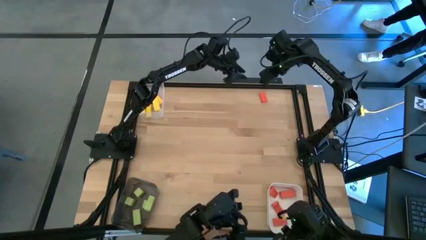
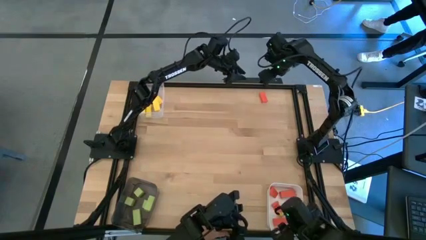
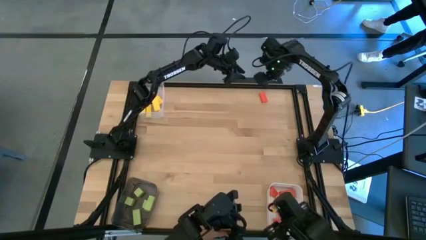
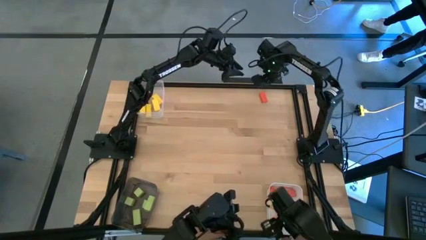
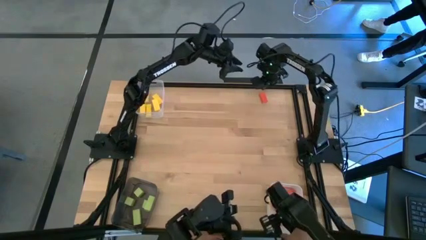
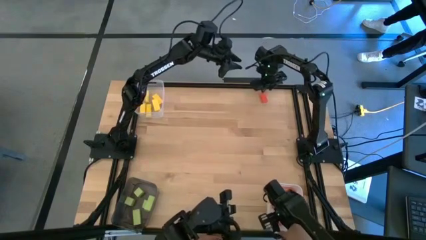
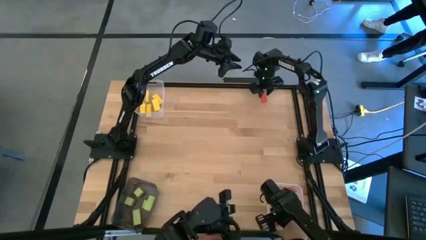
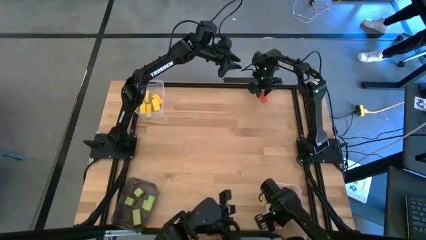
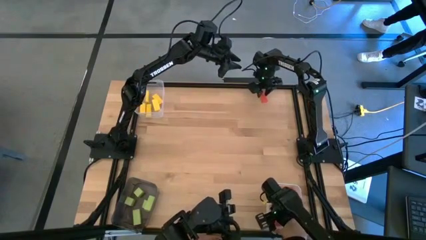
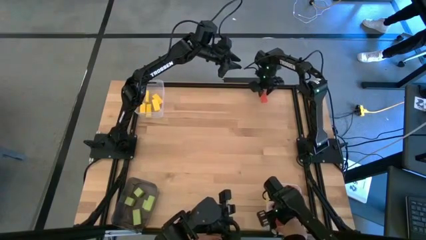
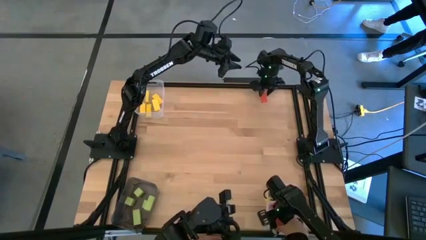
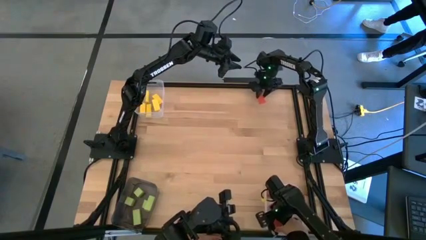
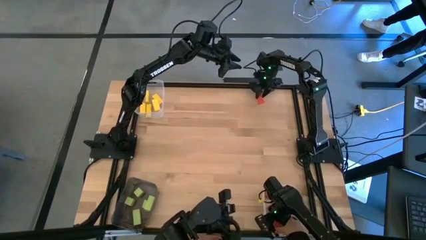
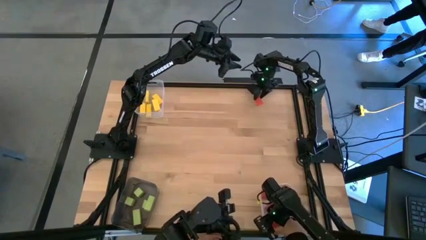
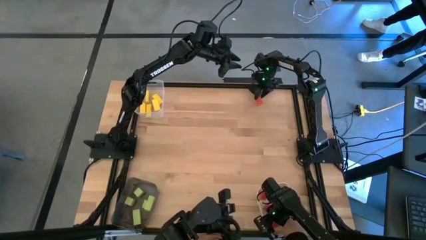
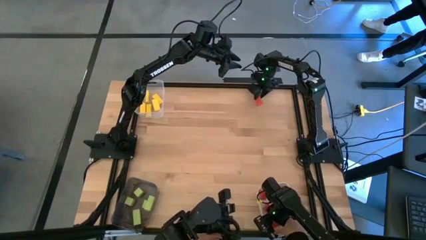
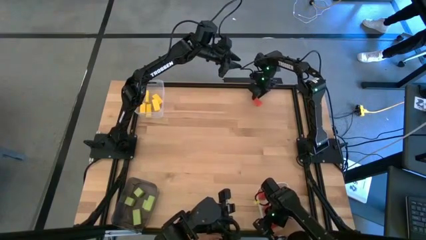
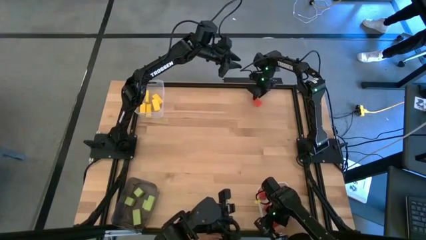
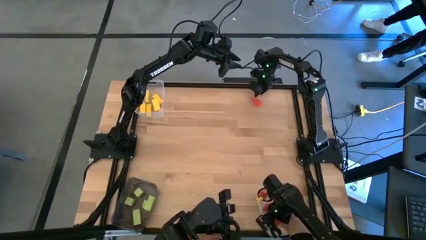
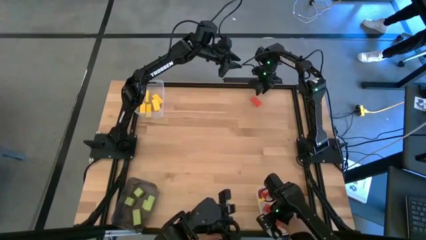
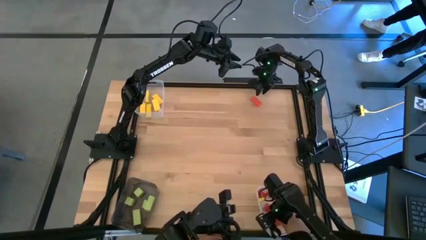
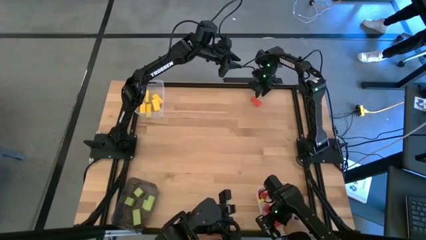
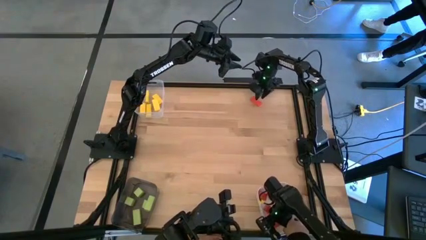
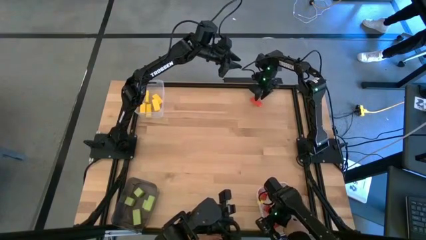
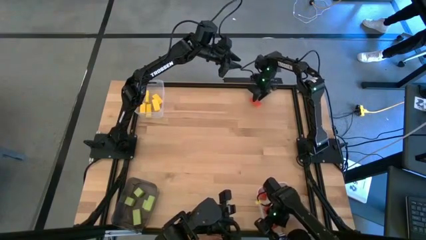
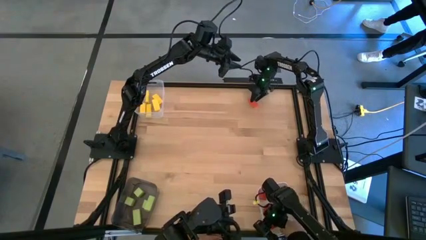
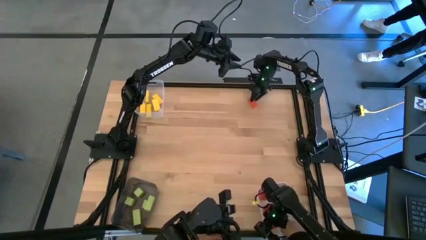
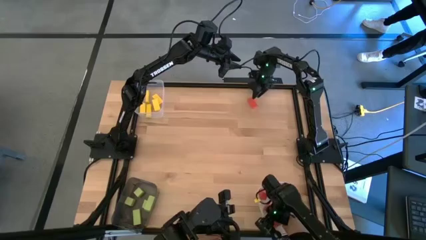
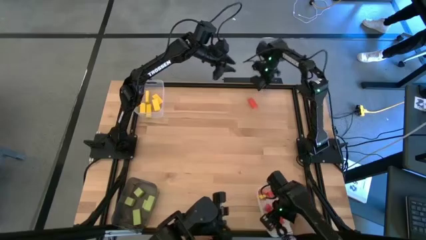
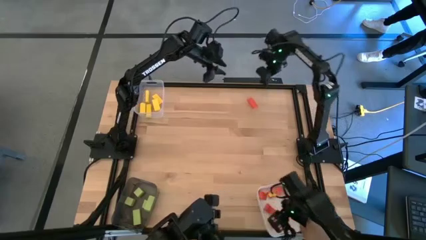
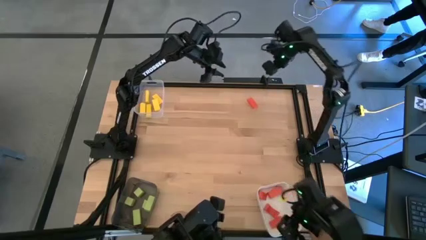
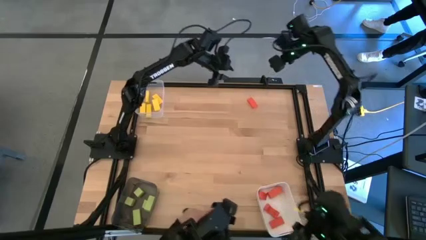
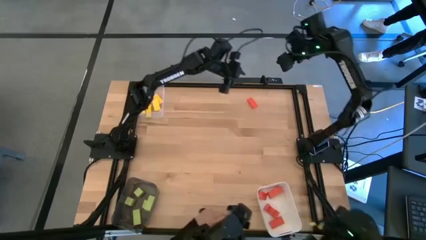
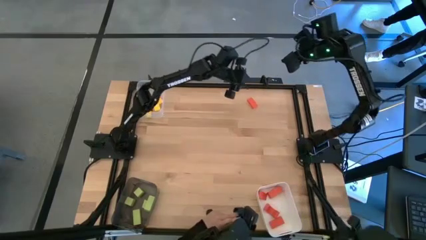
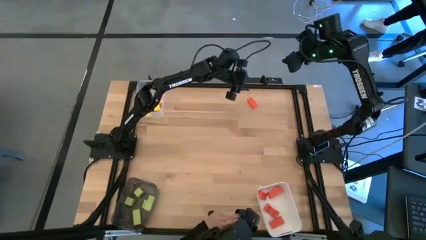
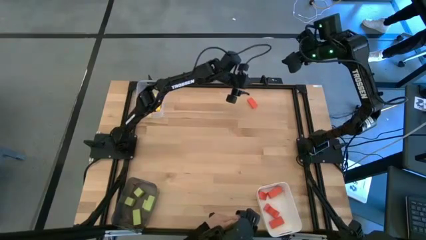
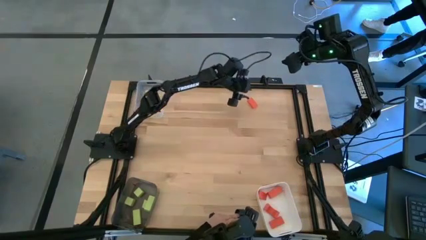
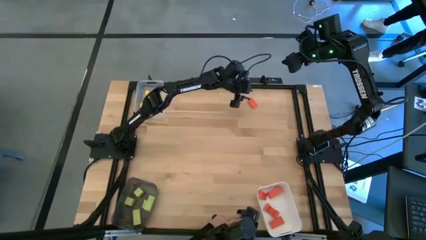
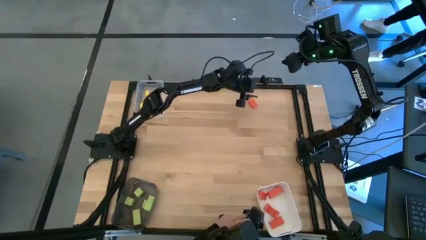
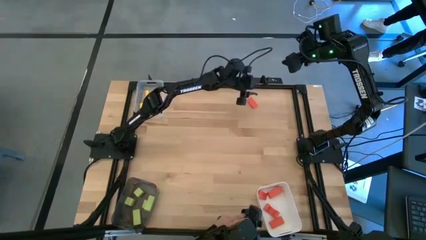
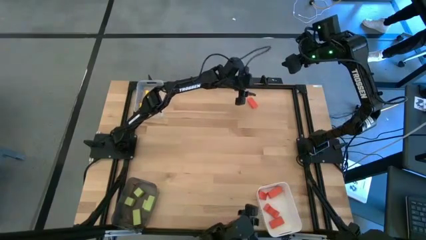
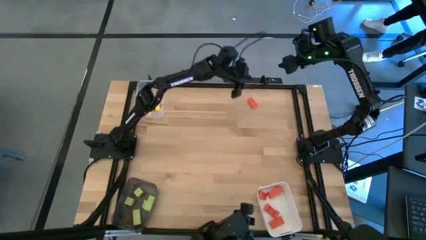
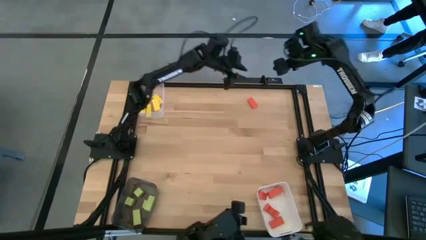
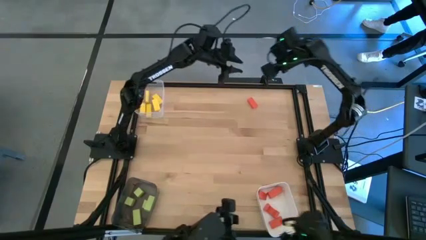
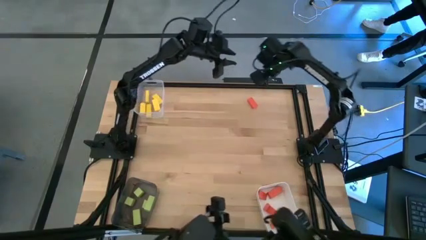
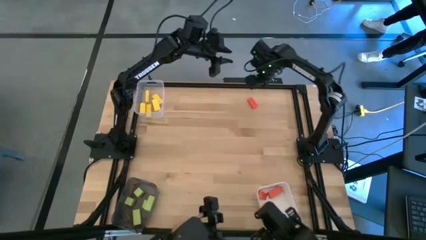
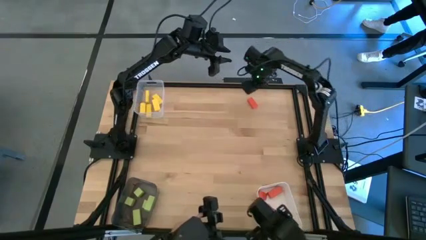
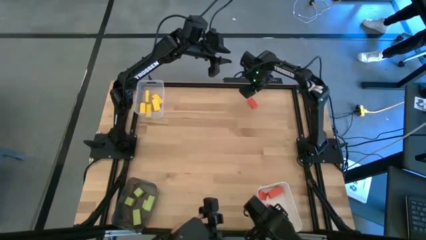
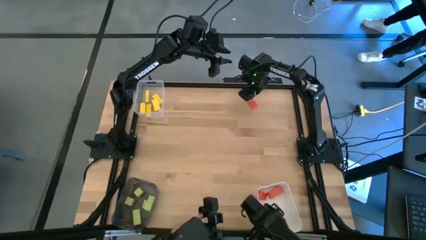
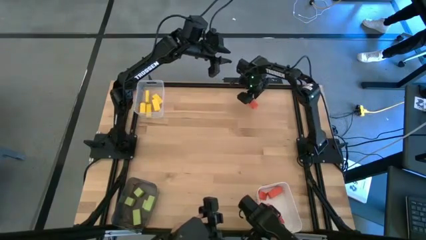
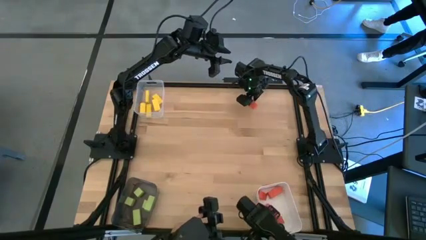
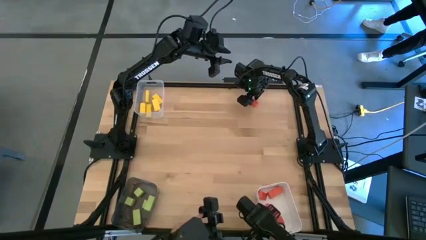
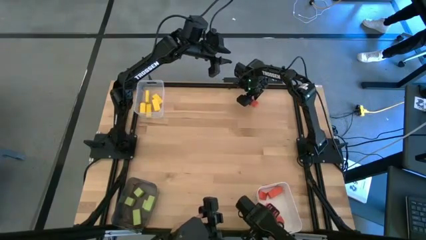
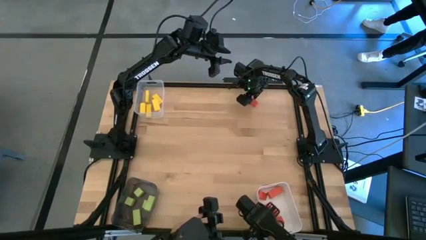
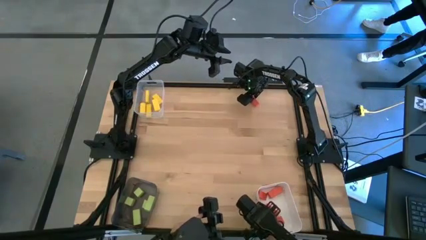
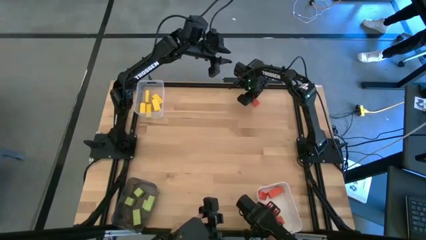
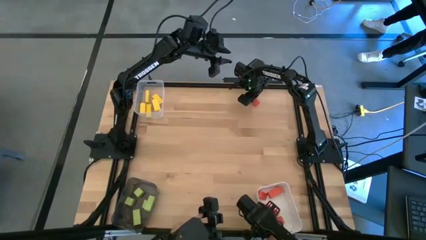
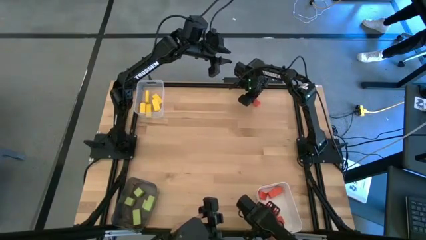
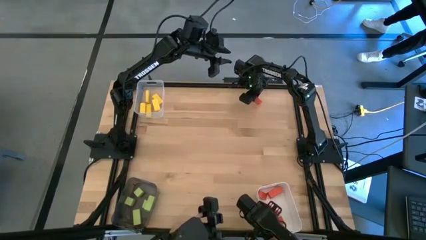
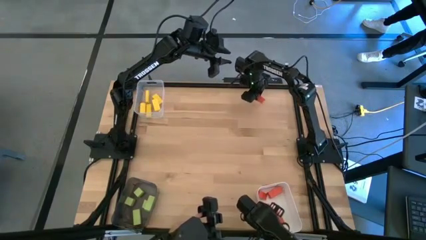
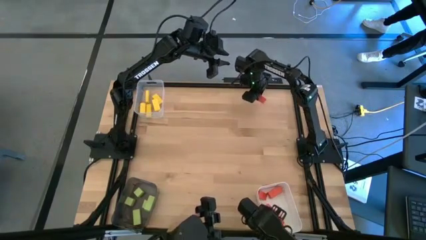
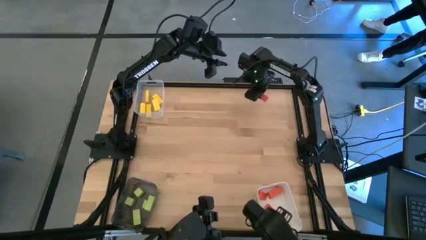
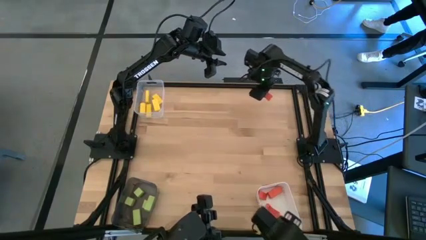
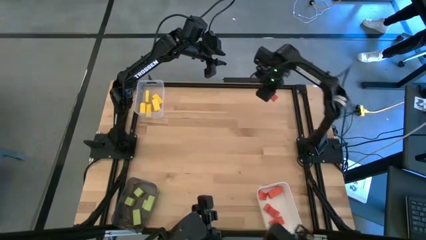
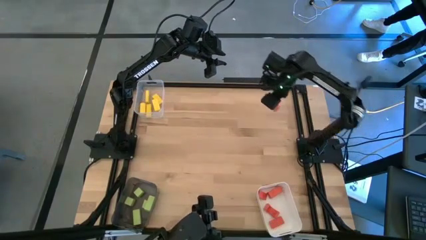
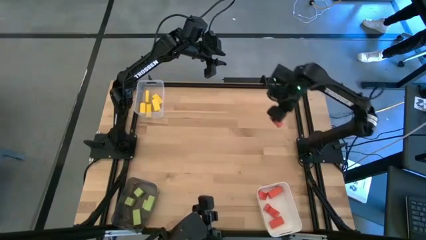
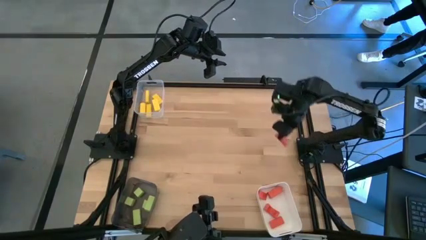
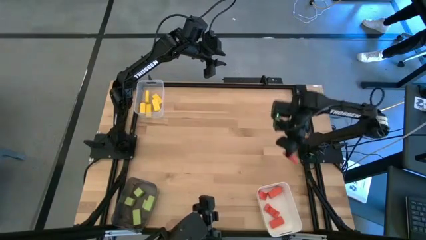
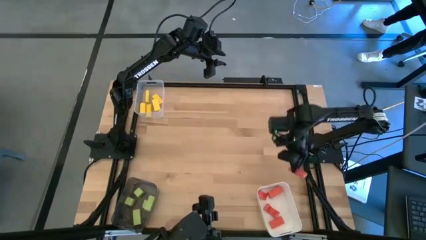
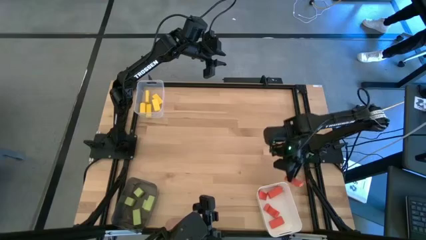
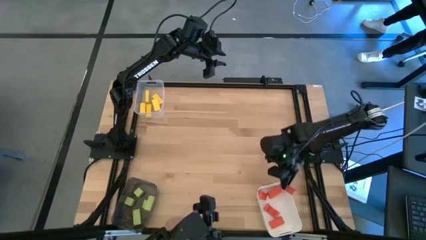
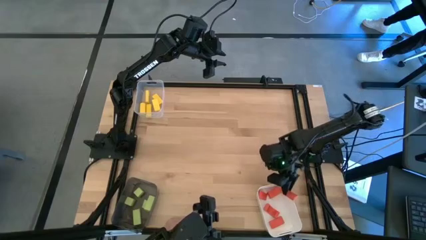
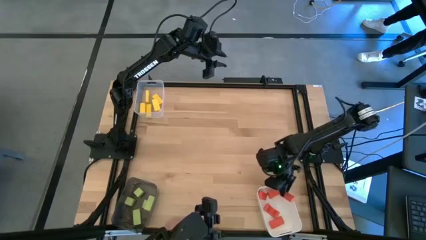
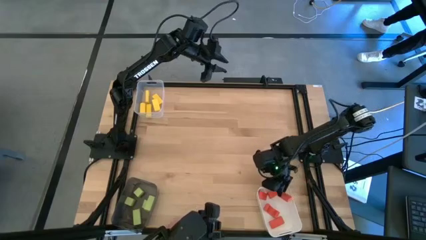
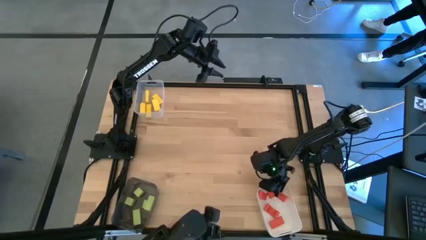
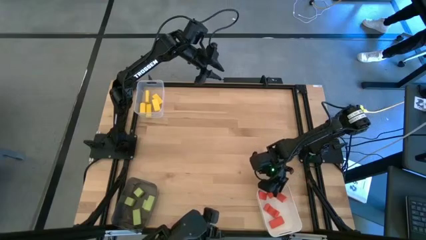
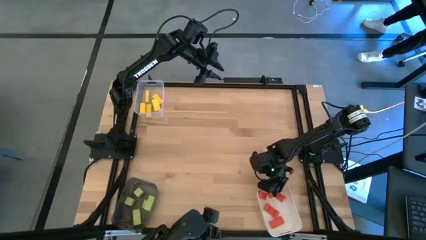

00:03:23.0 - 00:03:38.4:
Task: Sort & place blocks by color
Put the orange block into the white bin
